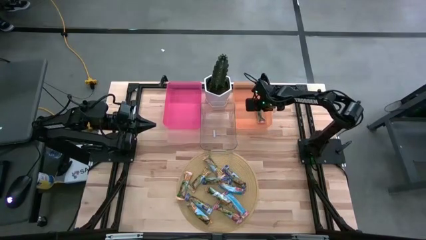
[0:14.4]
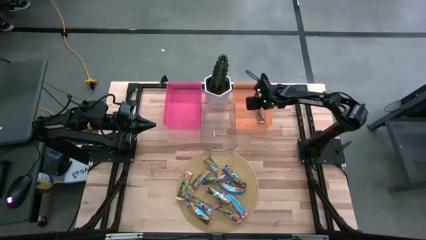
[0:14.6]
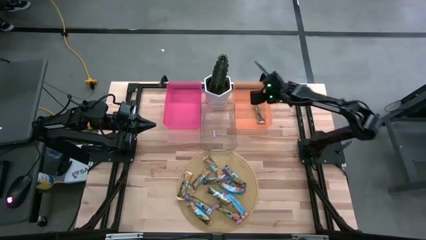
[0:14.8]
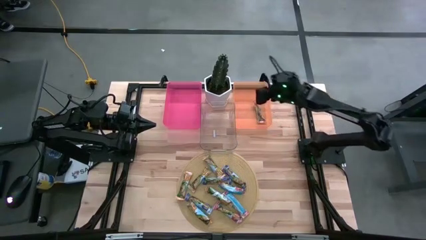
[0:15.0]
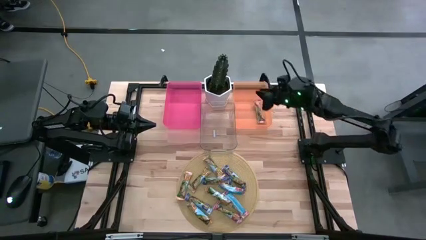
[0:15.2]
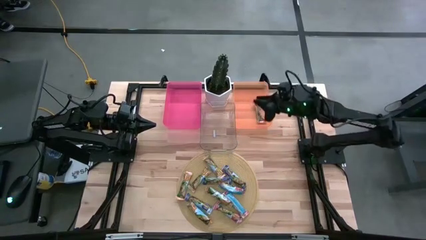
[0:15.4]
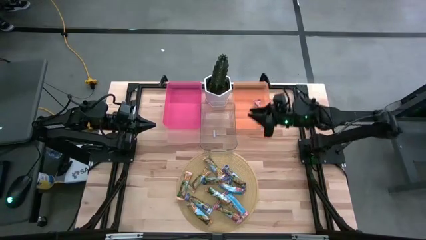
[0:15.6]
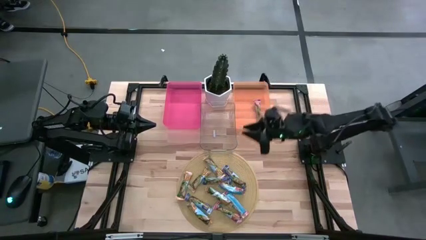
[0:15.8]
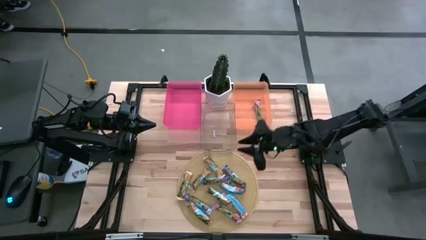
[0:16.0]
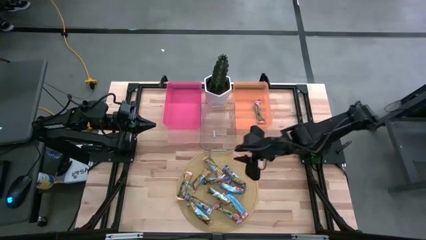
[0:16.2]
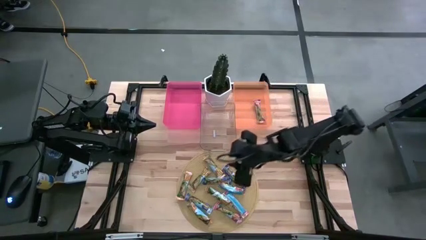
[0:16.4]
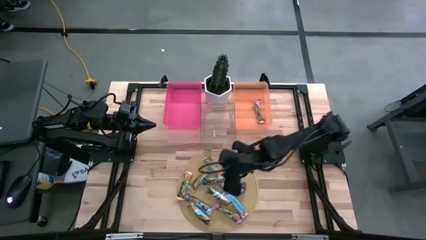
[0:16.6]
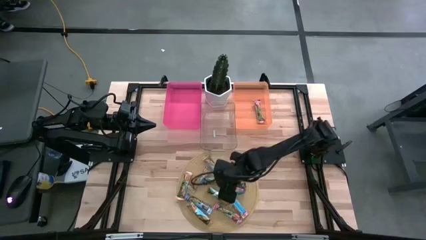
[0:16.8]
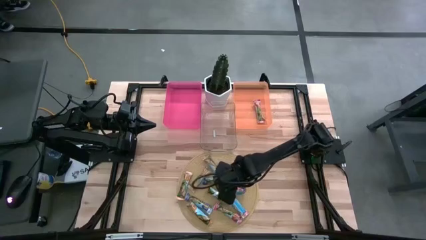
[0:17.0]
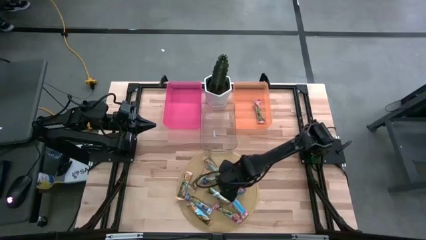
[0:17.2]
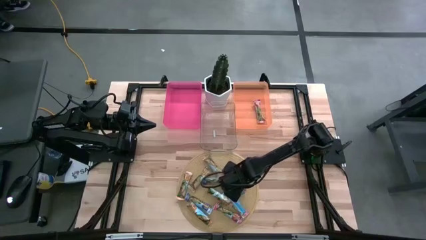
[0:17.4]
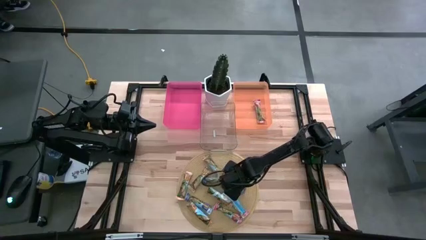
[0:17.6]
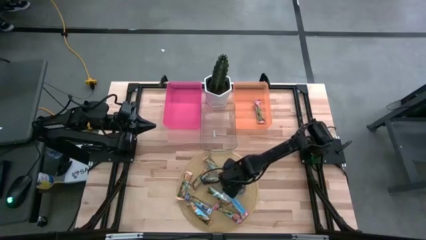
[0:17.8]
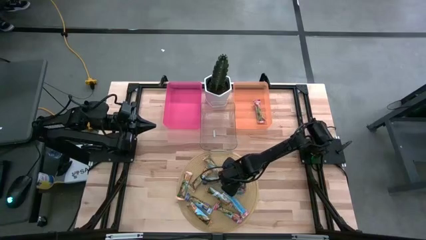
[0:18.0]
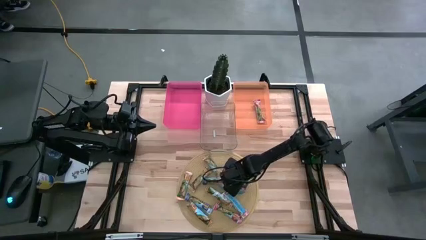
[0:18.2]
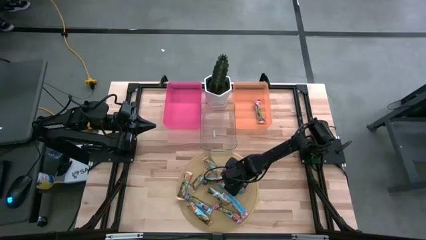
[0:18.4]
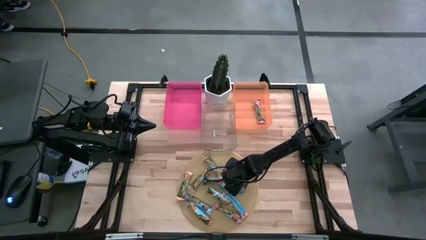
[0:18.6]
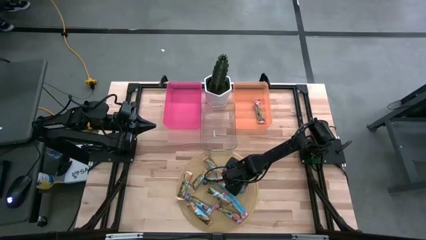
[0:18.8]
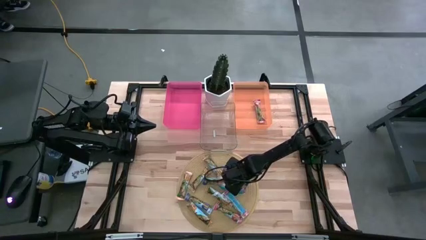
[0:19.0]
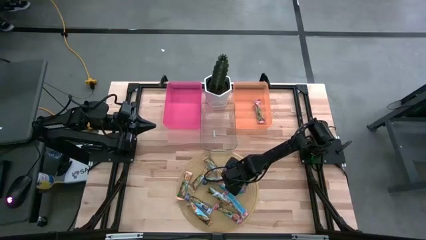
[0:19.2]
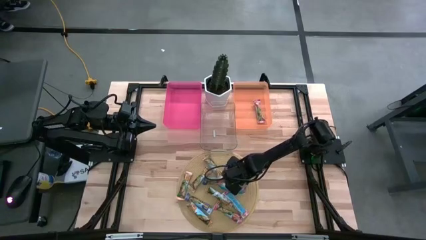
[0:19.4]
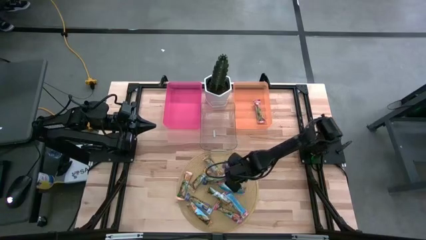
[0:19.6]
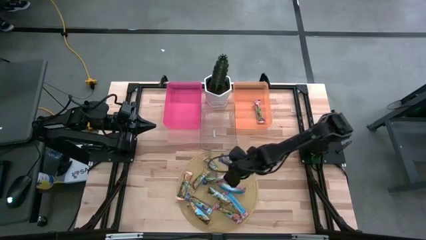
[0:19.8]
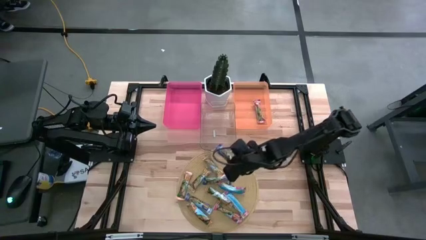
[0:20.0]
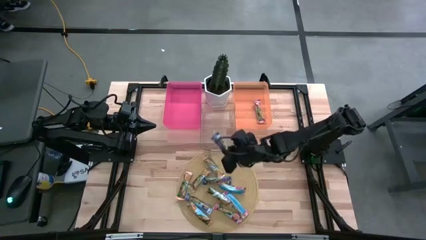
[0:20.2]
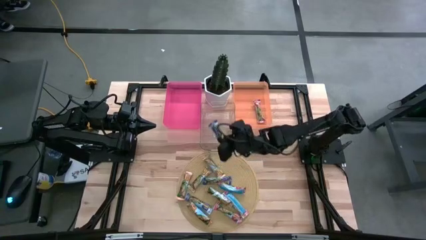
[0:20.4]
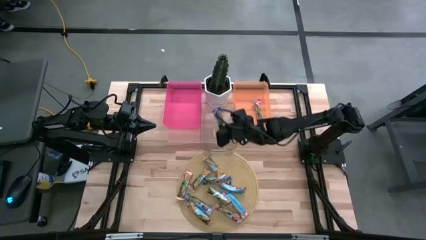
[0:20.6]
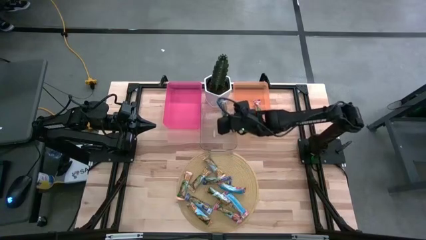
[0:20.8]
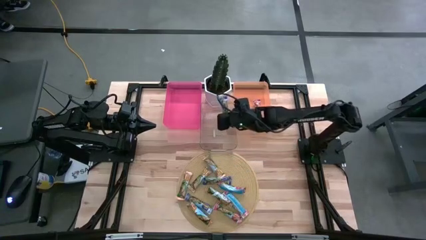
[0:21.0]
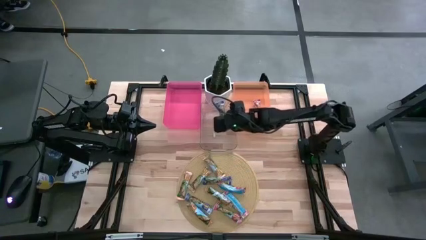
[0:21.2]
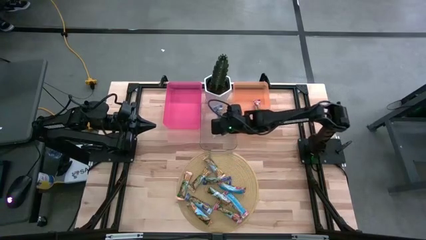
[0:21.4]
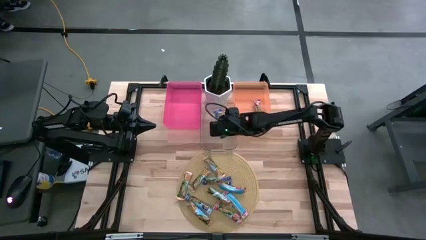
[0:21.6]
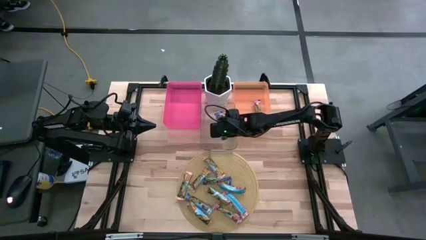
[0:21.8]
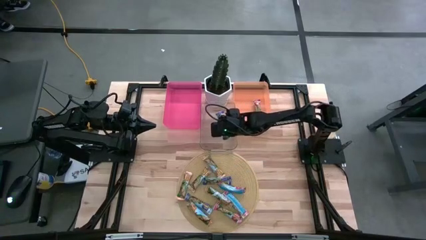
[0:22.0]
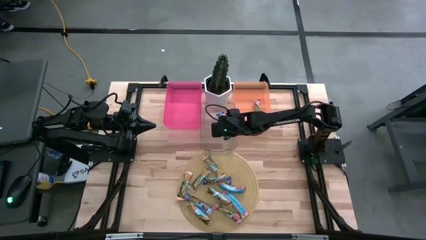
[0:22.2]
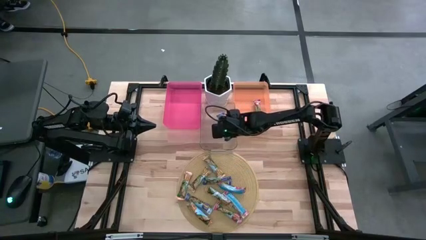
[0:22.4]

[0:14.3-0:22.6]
Task: Pick and place Granola Bars by type
Put the blue granola bar into the transparent bin

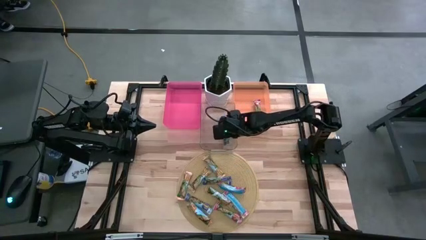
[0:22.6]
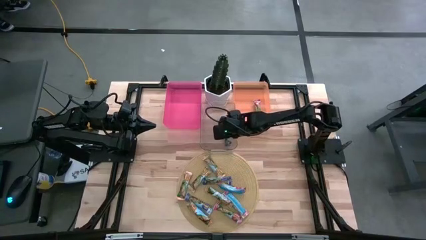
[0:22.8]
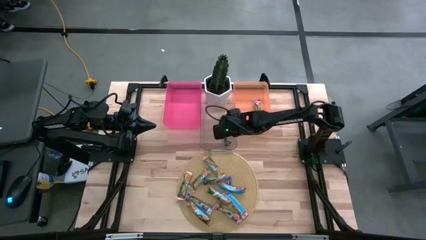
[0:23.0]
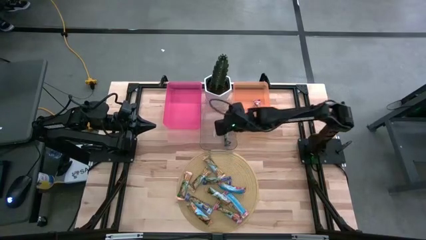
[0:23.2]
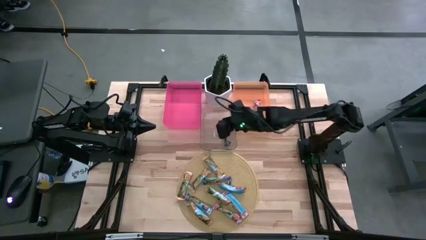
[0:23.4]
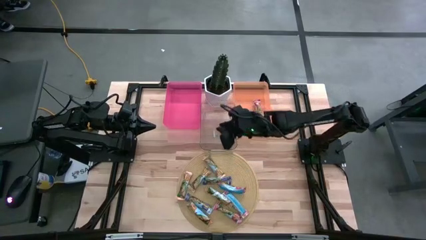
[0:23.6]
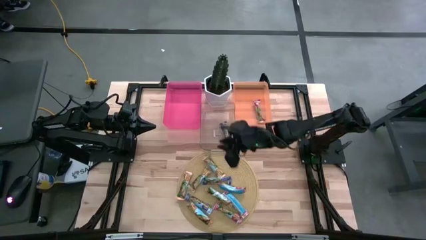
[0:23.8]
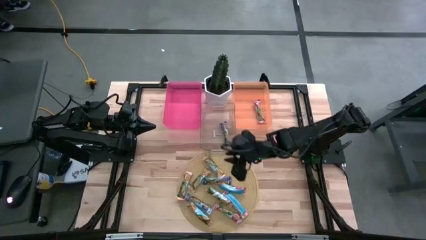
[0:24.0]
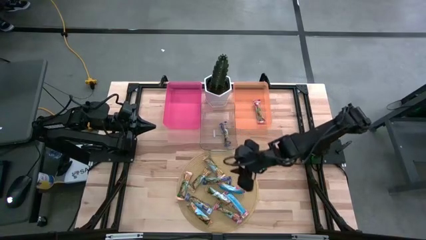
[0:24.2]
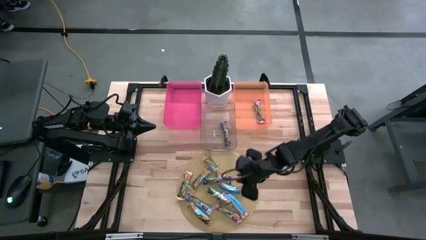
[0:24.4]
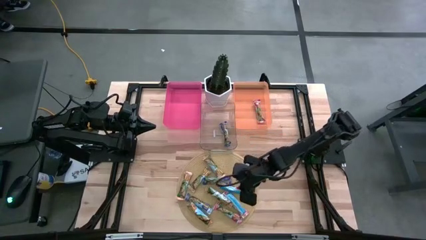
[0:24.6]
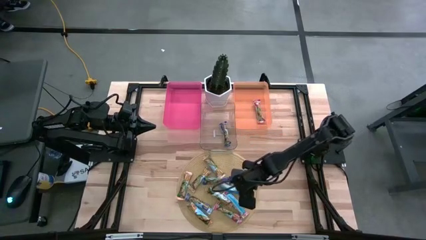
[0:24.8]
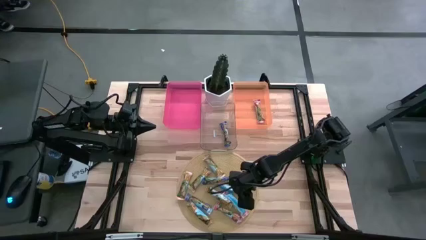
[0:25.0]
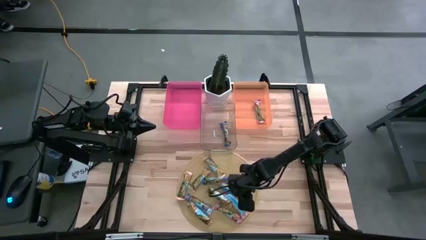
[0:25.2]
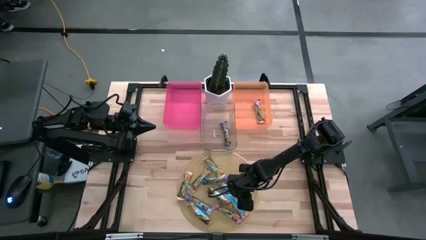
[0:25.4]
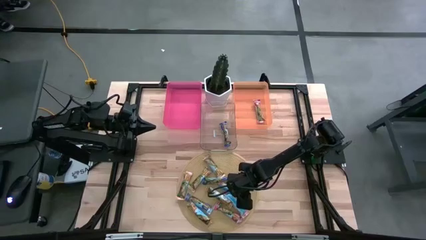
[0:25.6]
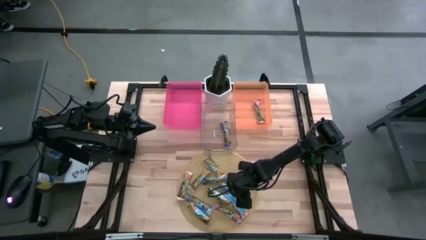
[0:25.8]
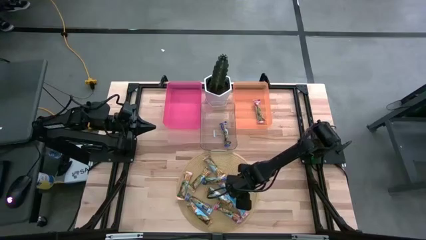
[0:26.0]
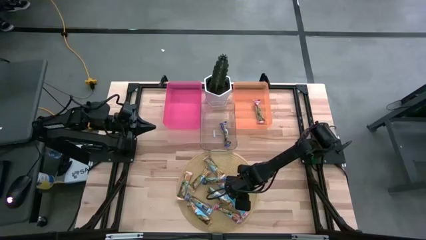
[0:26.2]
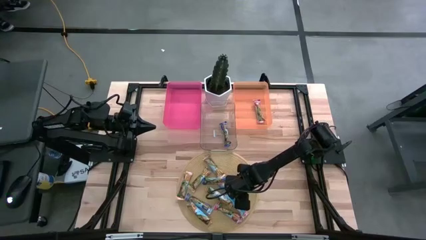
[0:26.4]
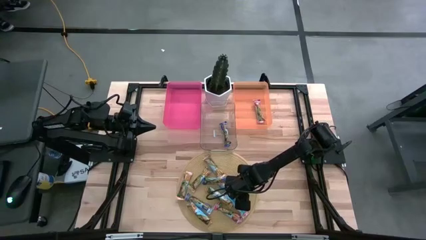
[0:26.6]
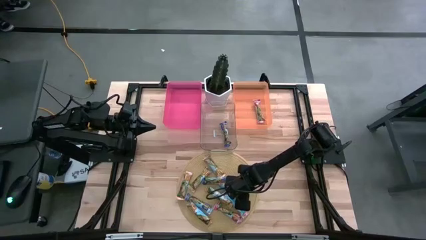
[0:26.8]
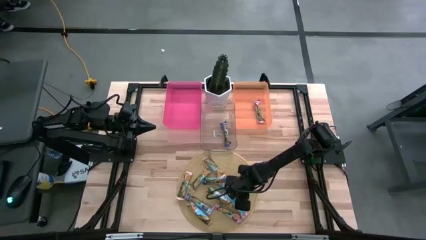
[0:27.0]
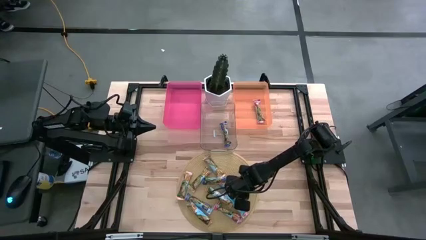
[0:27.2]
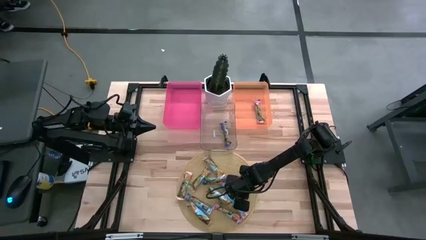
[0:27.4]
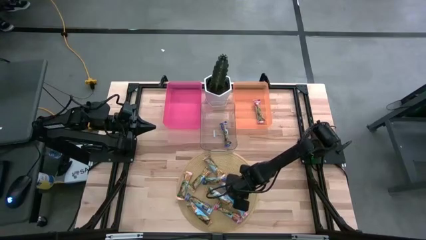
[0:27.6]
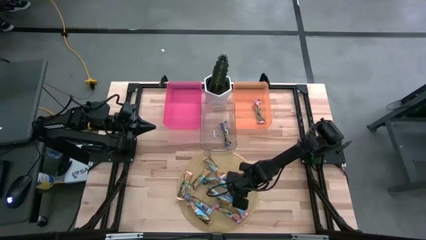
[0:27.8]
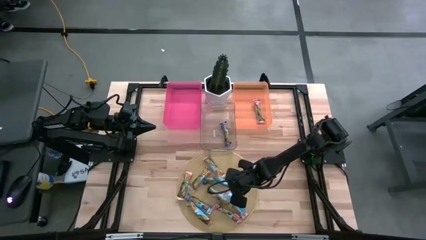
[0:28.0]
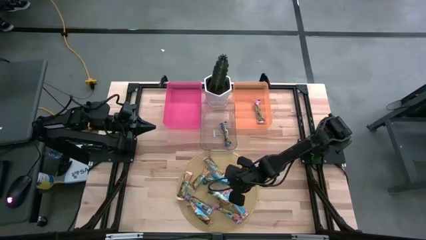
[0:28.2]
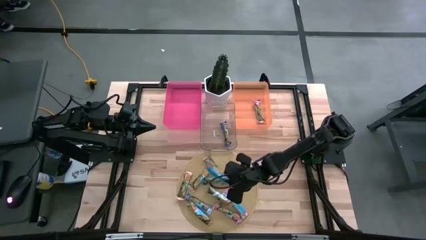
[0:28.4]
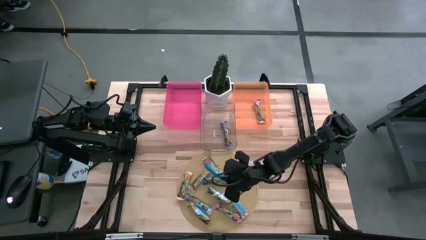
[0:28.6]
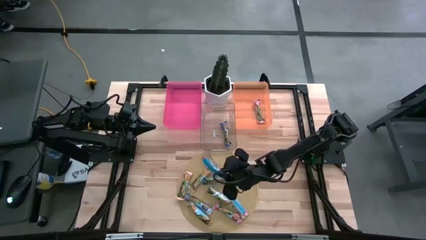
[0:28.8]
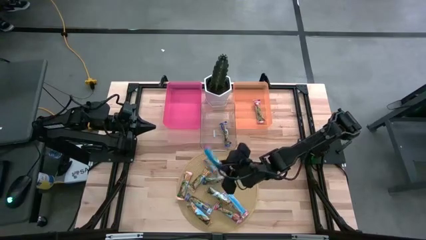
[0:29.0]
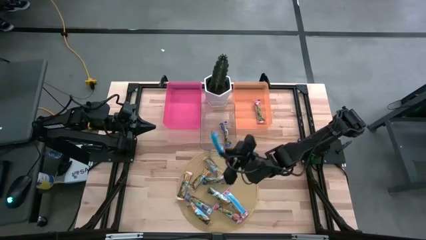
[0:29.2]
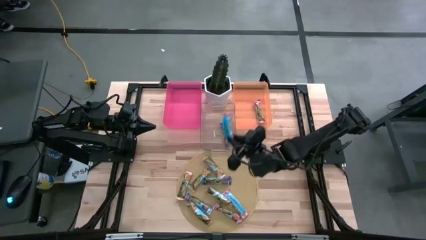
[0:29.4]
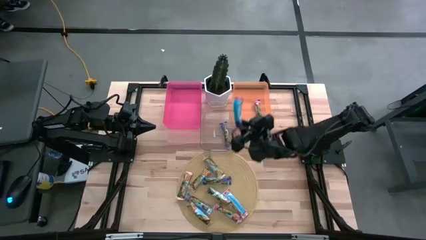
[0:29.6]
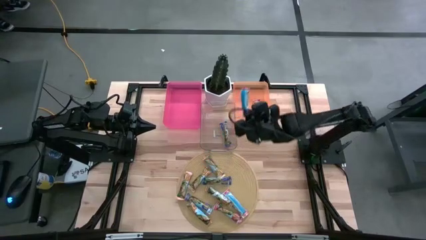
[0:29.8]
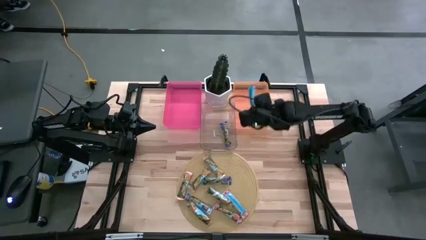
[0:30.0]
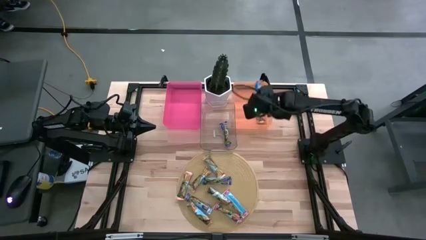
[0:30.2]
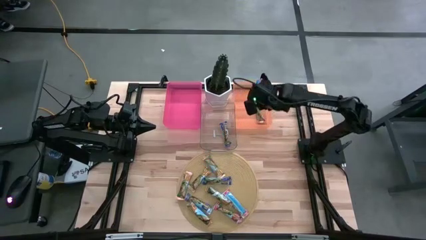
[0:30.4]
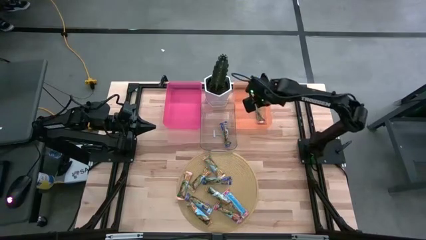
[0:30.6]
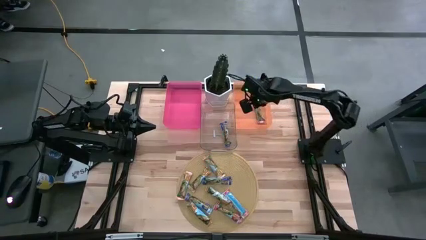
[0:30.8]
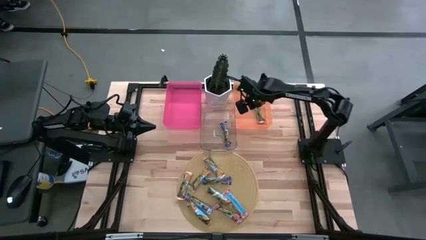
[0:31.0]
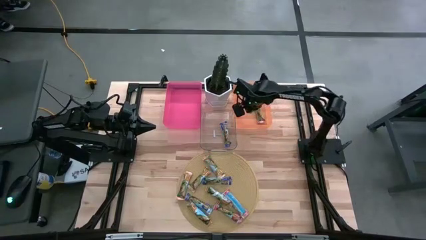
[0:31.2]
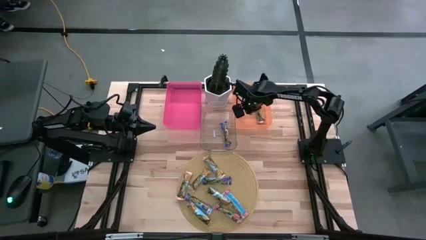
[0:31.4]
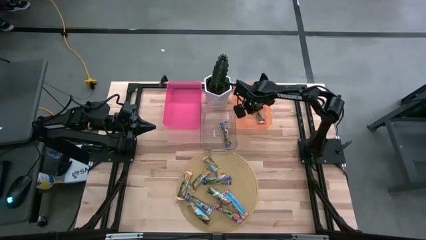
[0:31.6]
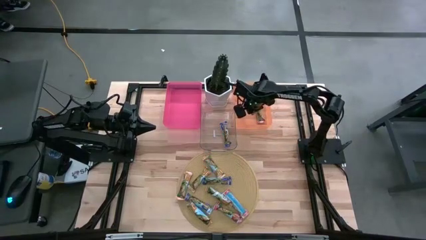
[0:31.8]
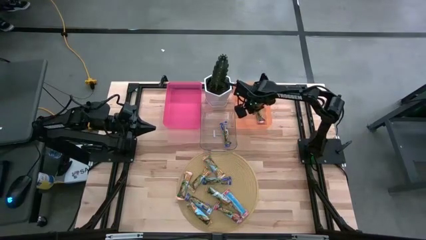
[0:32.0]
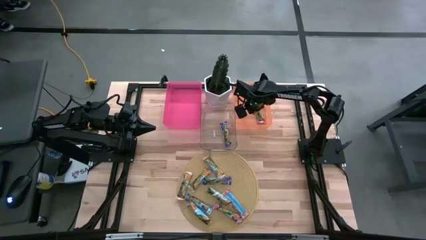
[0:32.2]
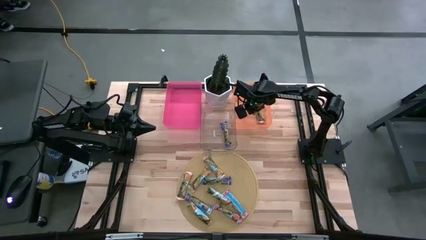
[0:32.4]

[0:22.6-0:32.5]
Put the red granola bar into the orange bin
